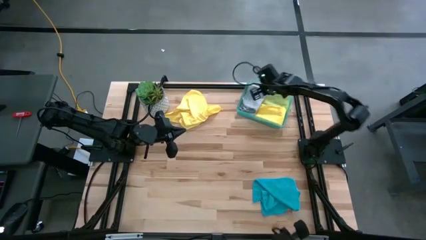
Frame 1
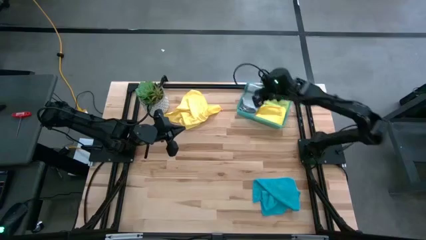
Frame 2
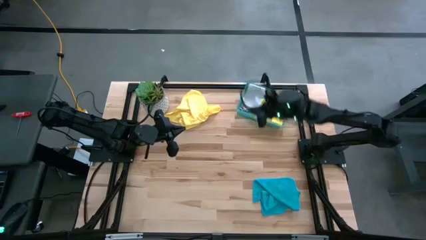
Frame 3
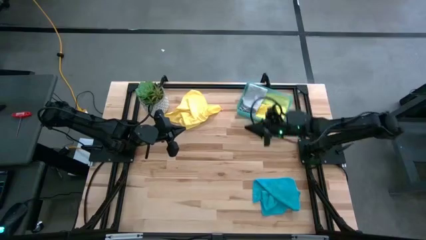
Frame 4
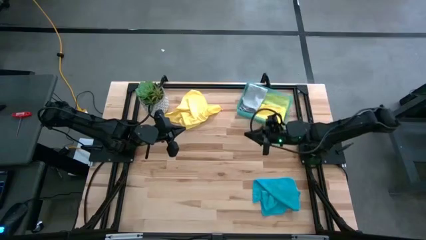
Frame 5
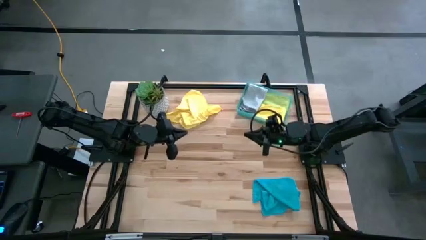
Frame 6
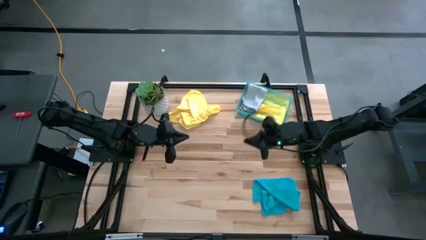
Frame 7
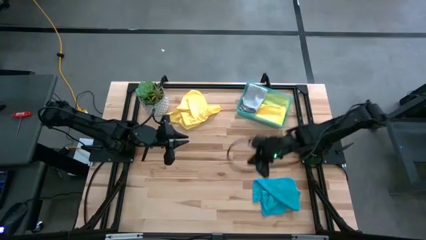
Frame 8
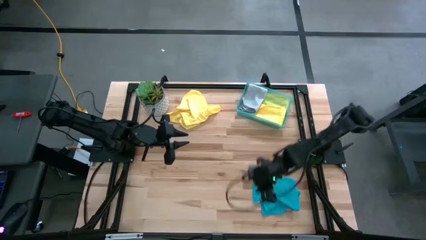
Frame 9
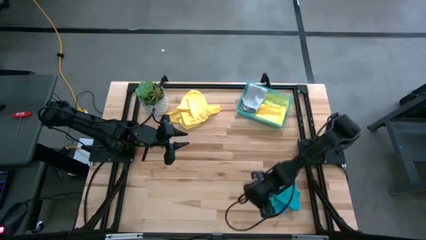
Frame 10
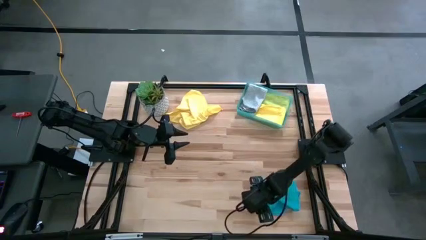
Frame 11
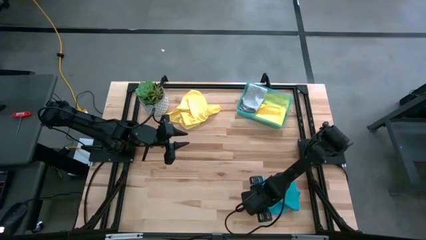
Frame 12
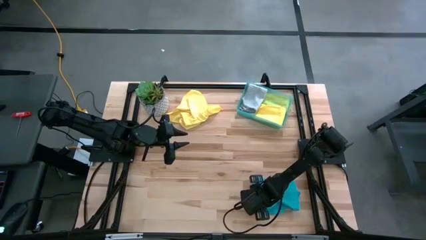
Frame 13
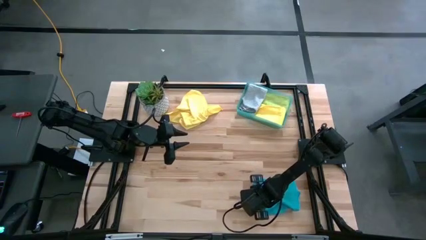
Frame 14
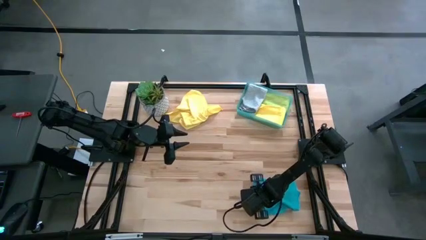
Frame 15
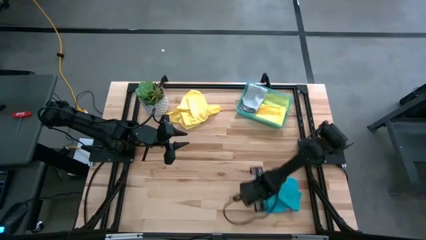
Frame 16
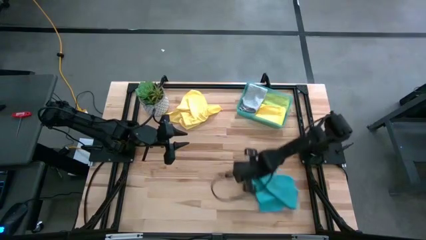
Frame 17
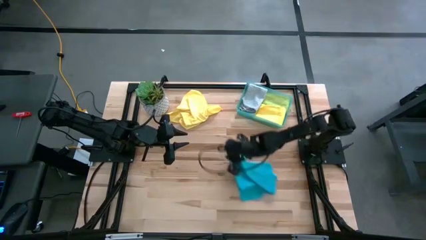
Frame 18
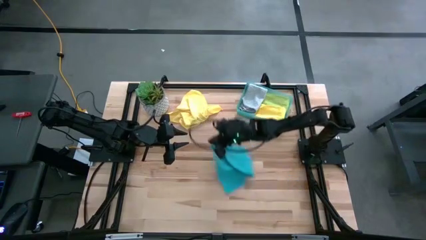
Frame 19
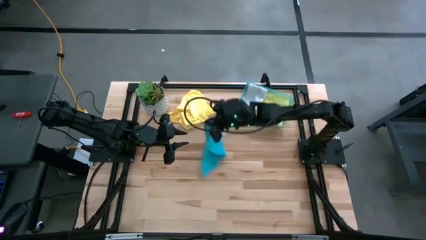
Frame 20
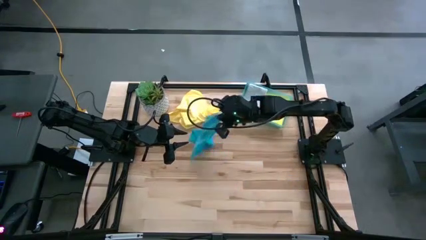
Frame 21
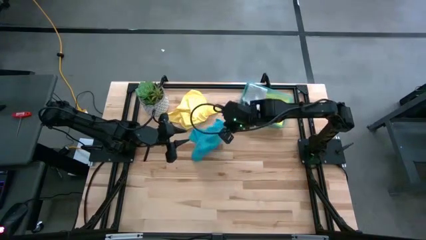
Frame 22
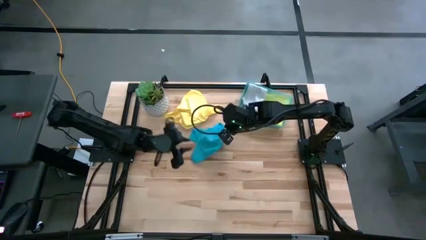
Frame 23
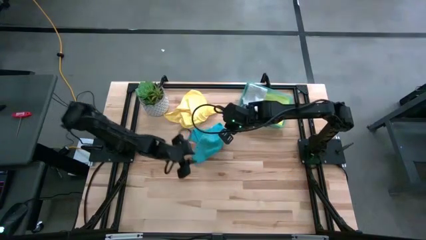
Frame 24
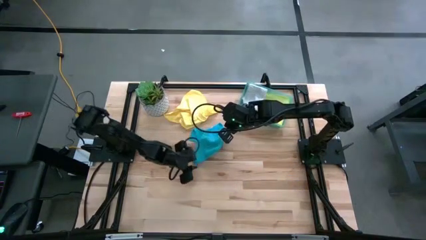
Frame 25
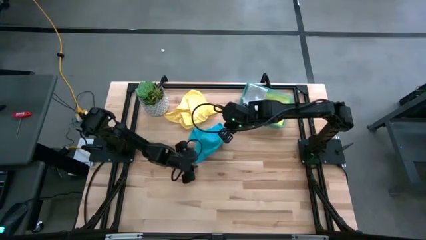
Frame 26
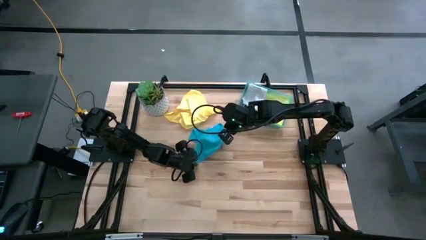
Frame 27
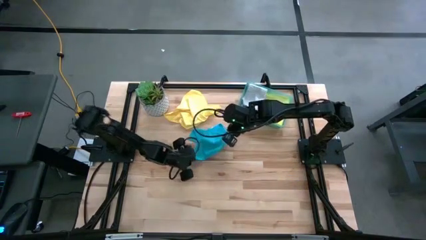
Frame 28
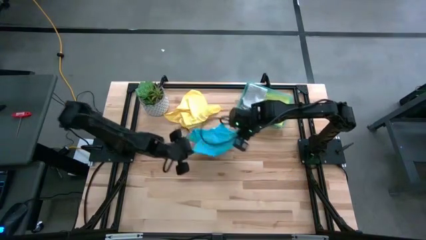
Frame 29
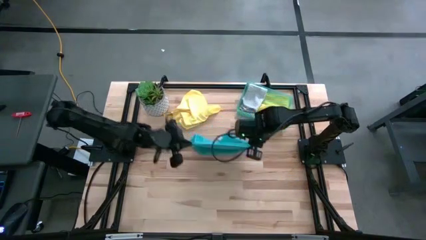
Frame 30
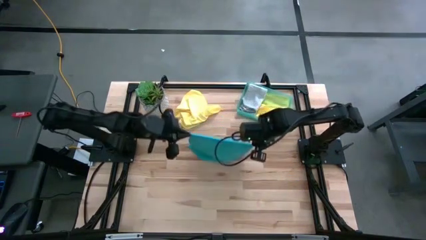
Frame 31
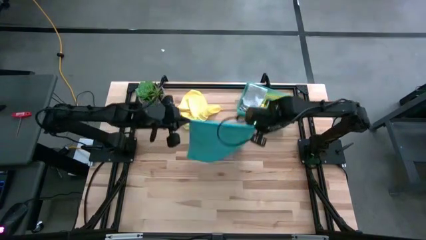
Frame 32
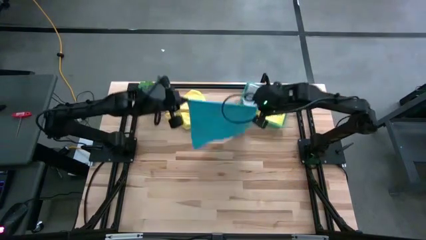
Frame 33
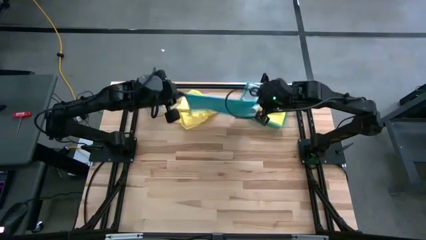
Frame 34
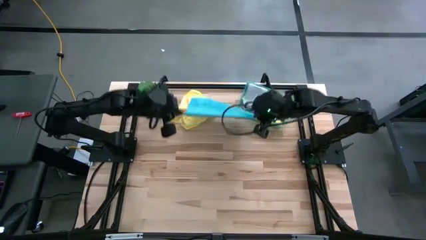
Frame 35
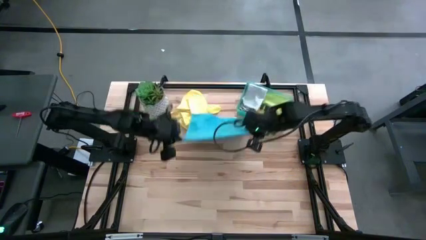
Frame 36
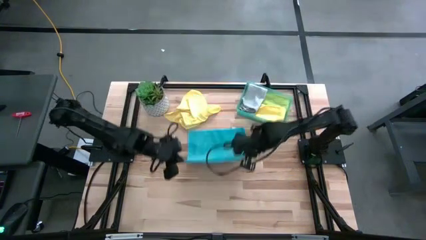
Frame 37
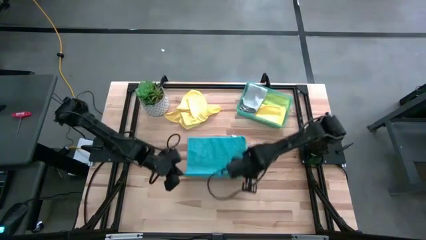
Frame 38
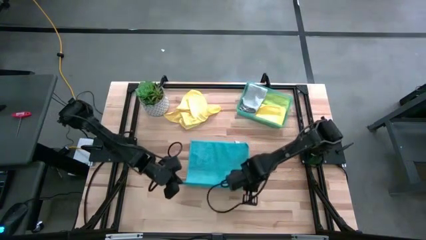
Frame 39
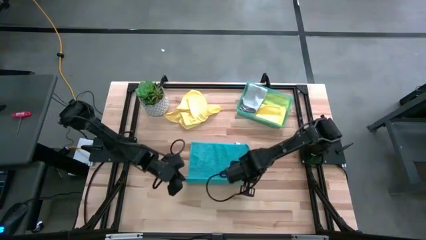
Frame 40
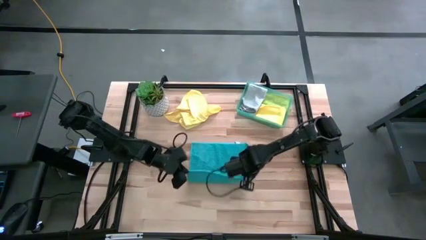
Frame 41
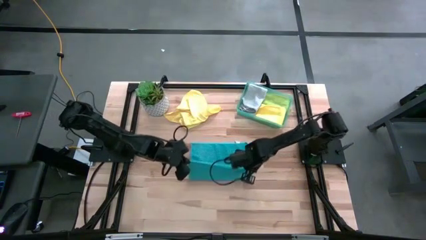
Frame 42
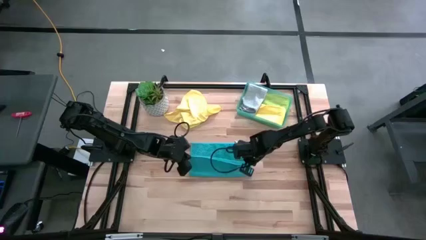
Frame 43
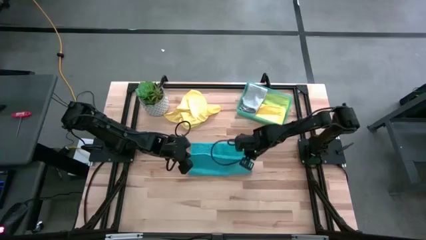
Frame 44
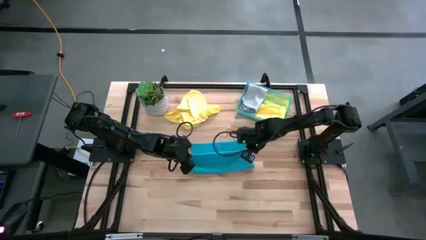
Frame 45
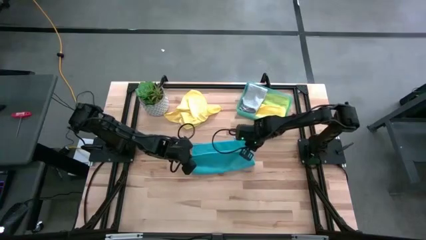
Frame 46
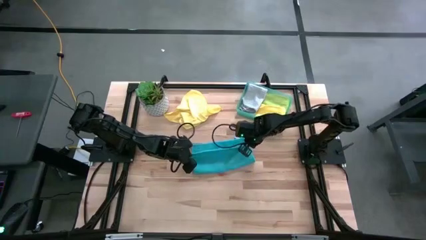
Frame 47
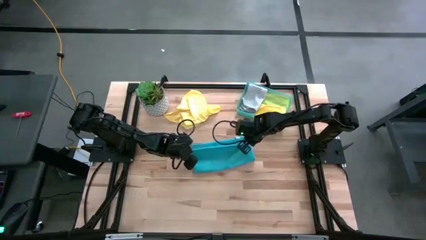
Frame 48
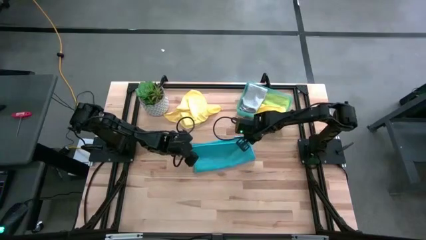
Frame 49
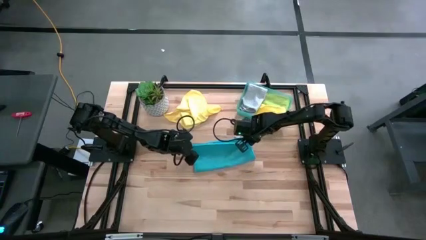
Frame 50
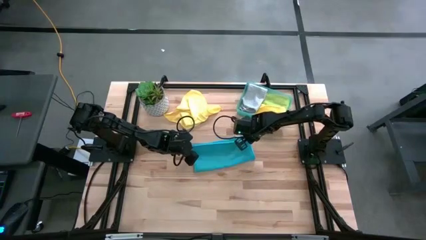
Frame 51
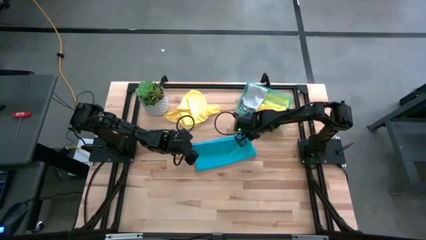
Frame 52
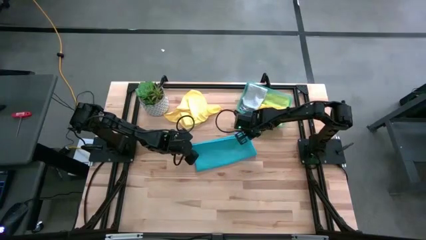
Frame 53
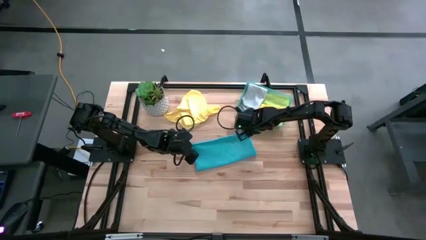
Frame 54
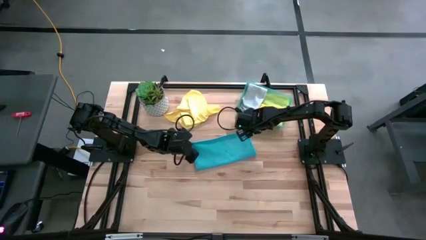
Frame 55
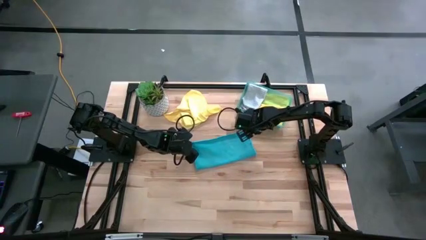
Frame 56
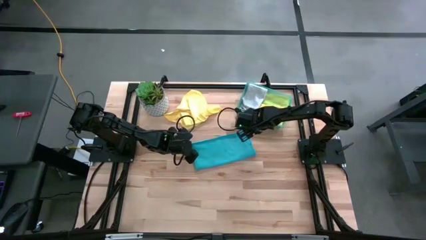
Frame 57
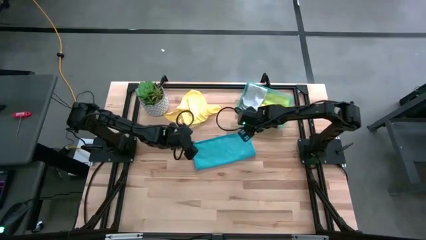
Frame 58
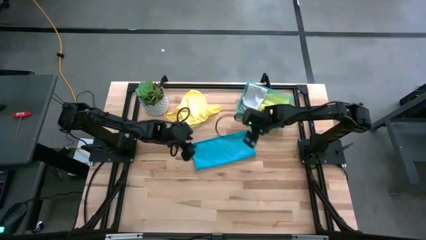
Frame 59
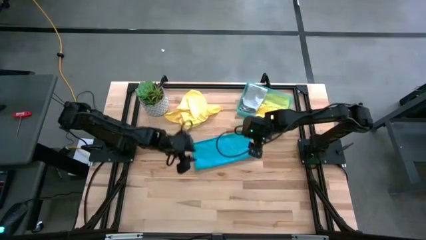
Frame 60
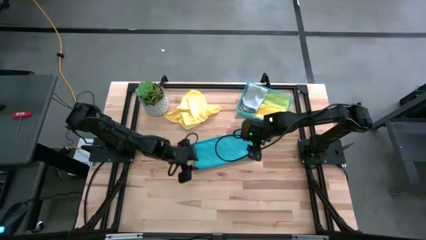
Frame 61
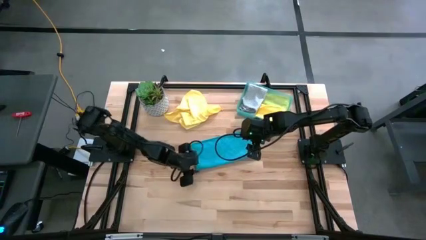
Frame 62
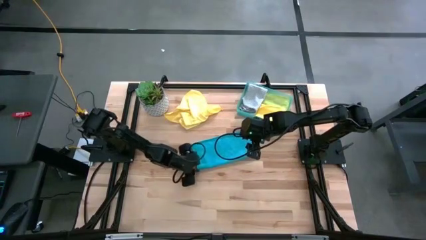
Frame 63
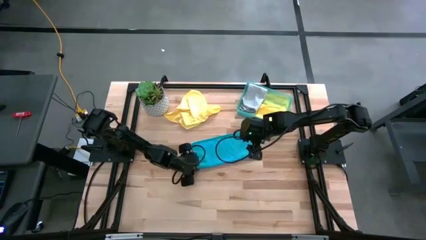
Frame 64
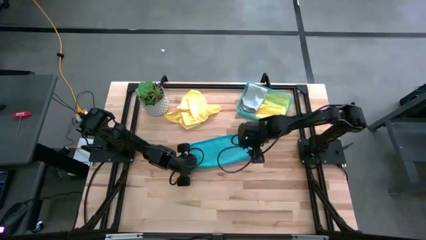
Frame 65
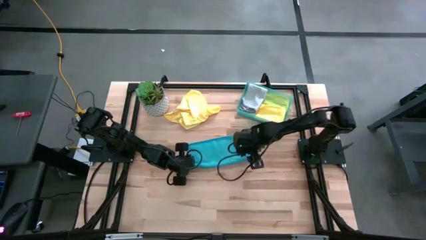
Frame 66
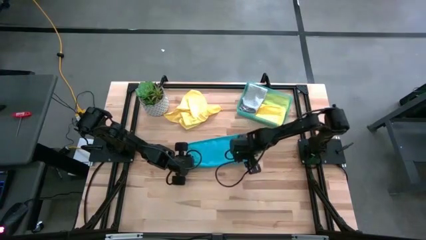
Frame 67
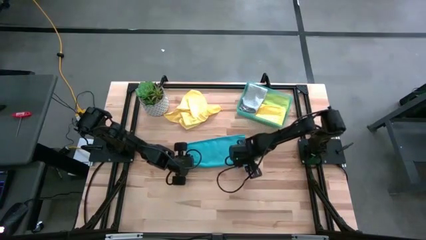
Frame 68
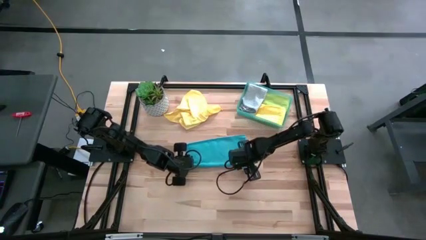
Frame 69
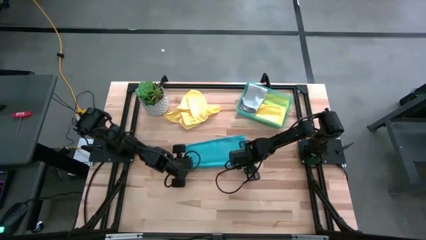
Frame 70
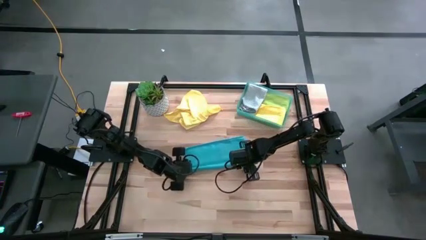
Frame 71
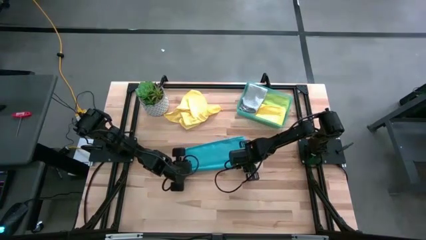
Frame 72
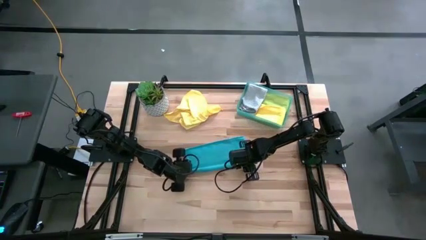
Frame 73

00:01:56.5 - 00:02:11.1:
Task: Fold microfiber towels
Fold the blue towel
